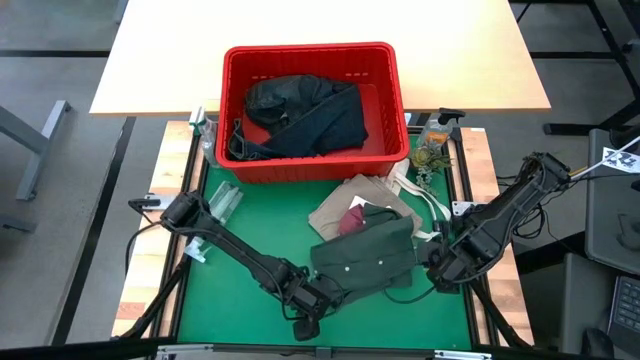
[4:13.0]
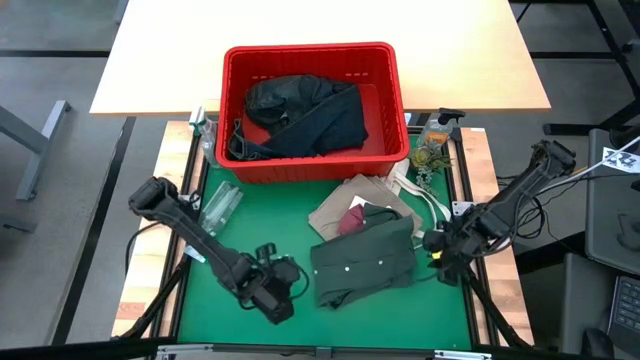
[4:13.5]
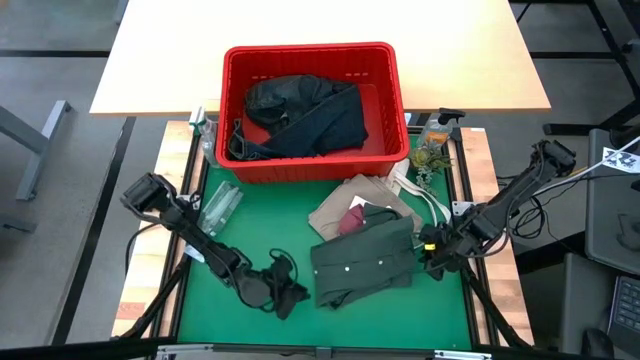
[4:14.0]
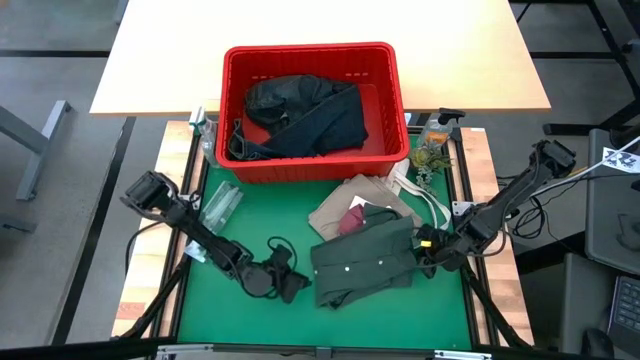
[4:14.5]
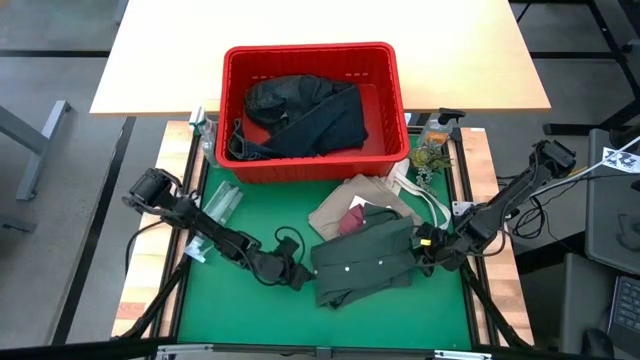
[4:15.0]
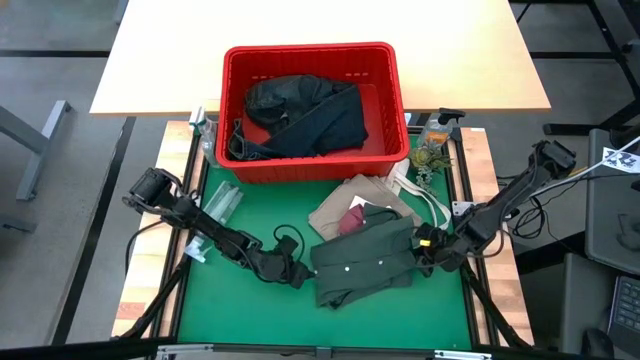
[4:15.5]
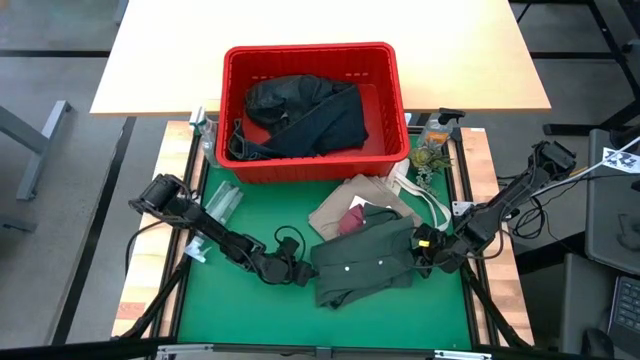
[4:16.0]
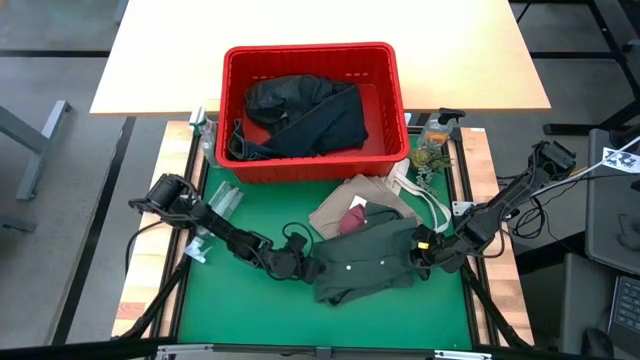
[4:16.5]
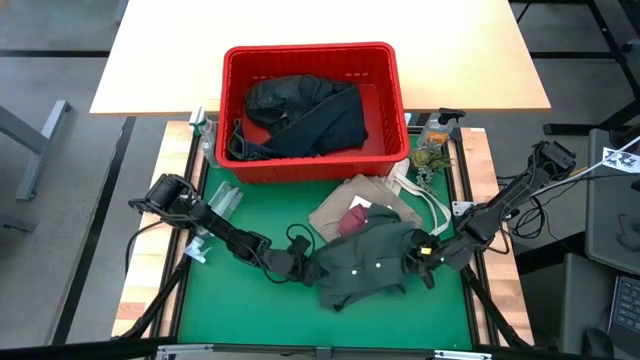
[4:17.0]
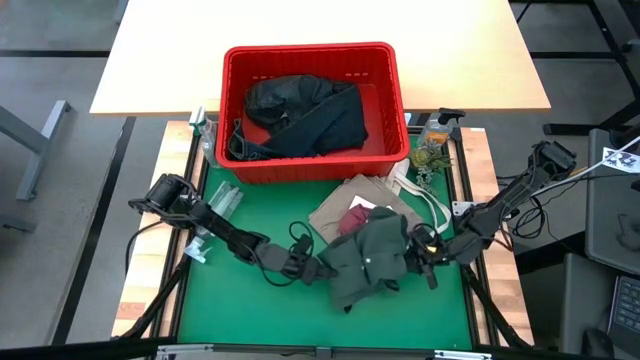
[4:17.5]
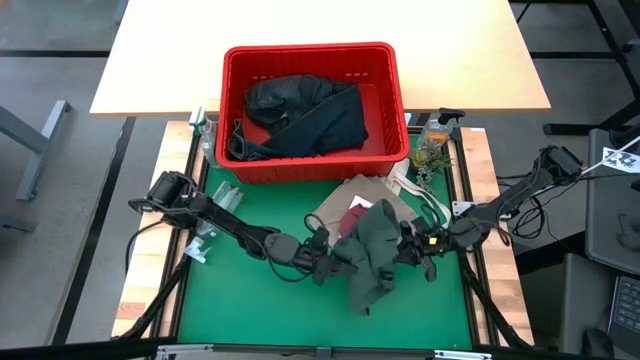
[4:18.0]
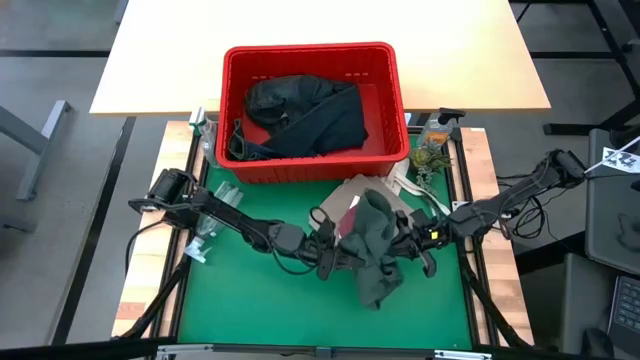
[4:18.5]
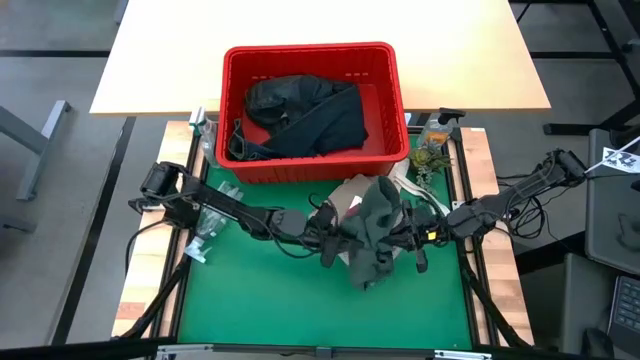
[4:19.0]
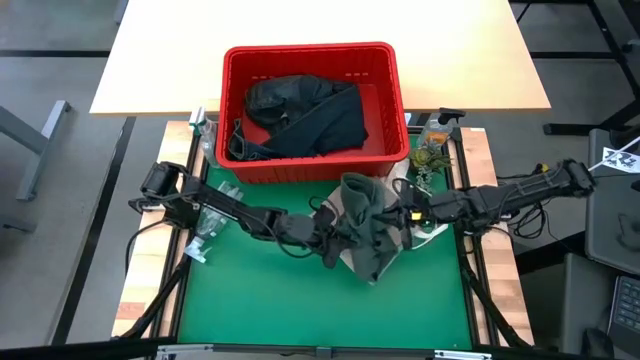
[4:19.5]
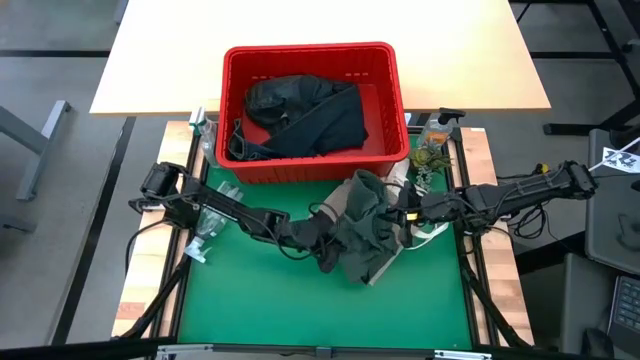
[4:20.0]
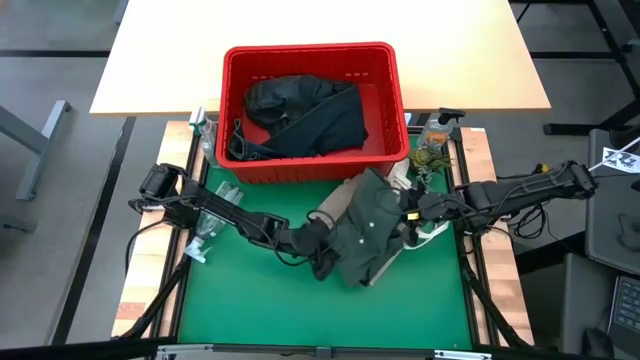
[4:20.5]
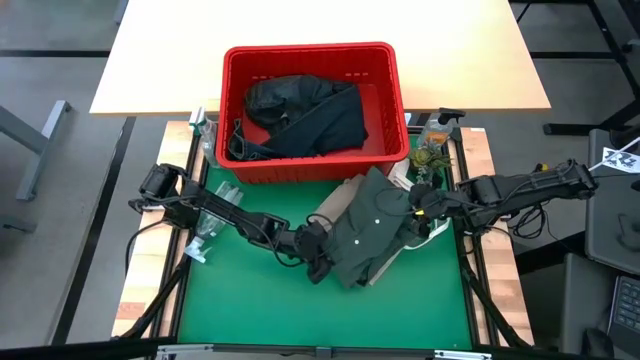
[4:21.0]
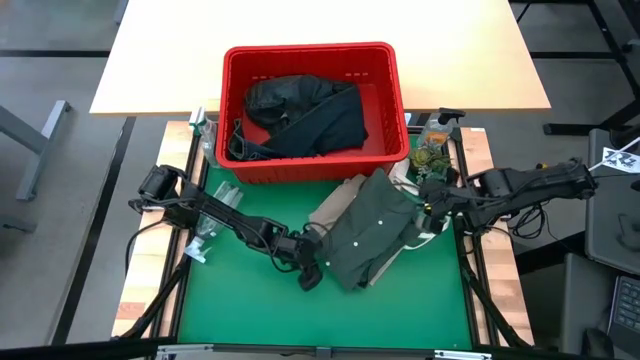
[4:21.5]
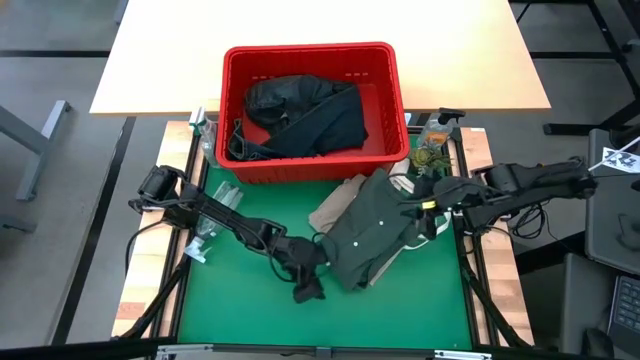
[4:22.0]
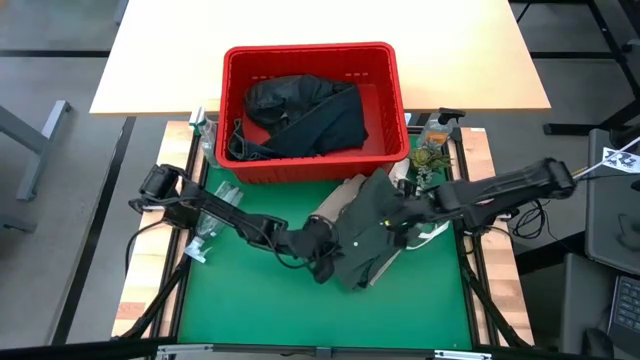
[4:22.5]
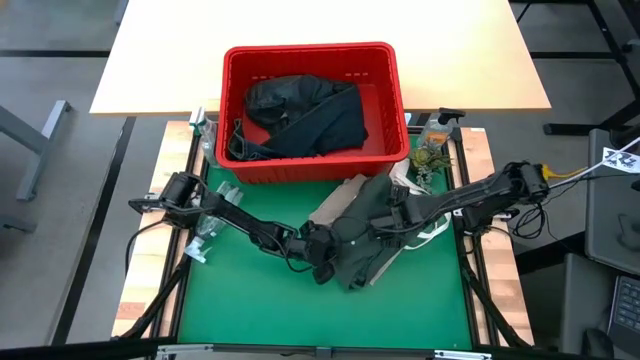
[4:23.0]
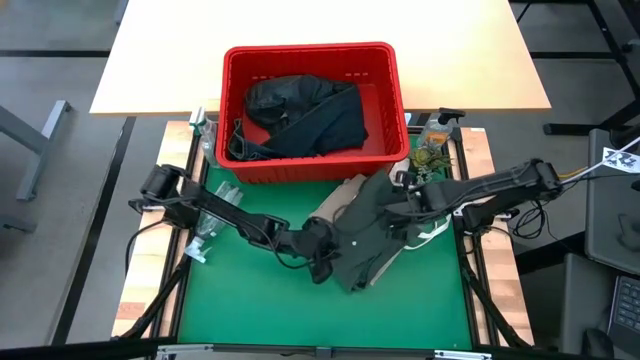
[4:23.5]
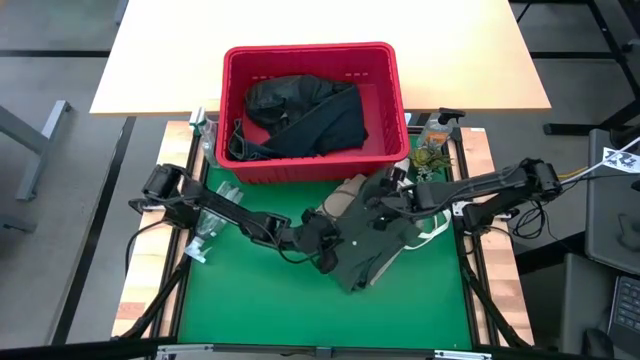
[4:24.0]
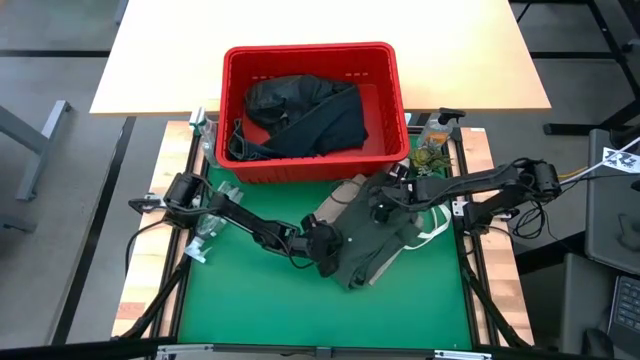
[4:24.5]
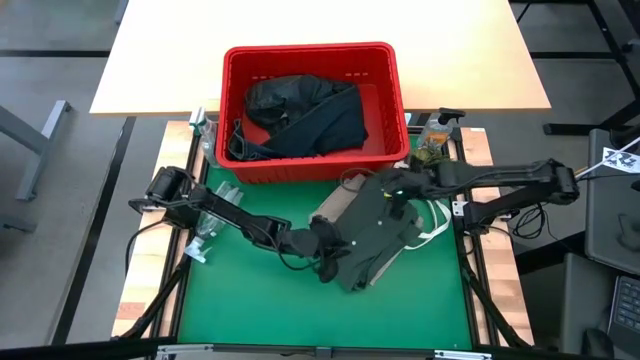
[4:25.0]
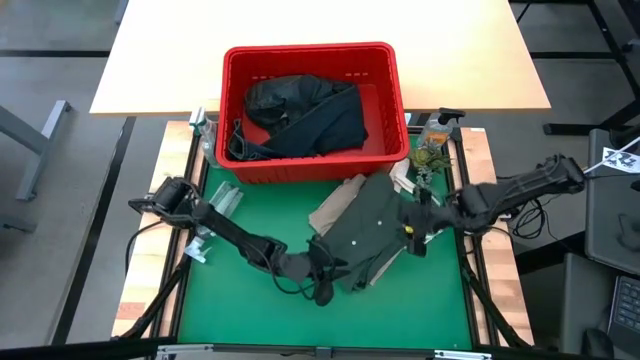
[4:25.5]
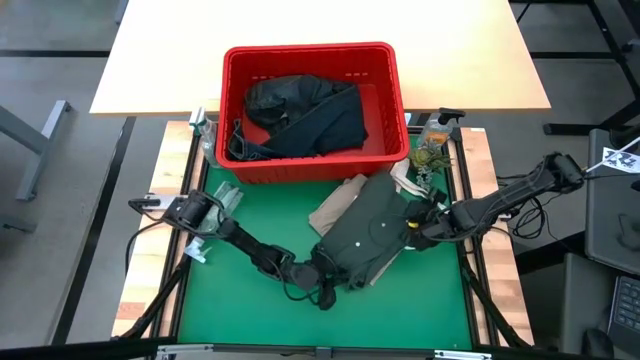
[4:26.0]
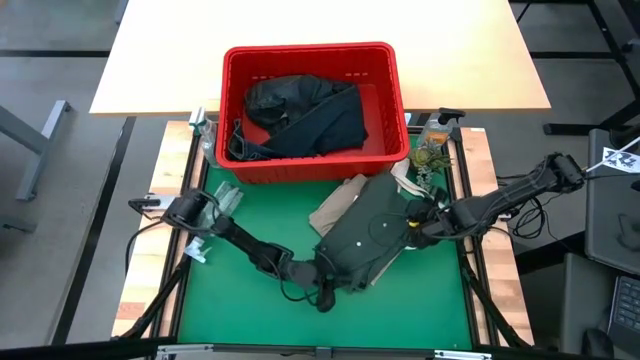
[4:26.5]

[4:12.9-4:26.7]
Task: Fold laundry
Stack the folded green polo shirt on top of the folded pink underwear

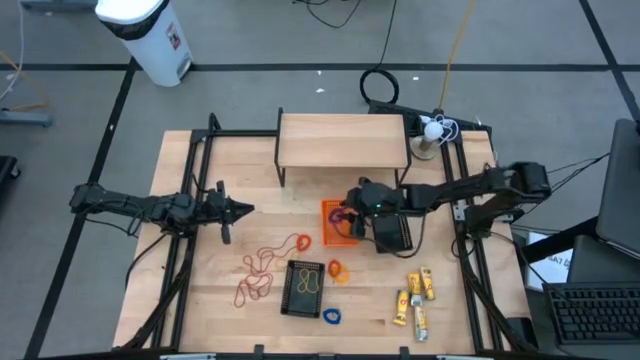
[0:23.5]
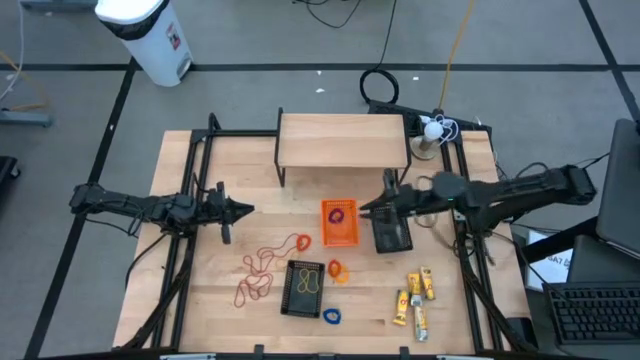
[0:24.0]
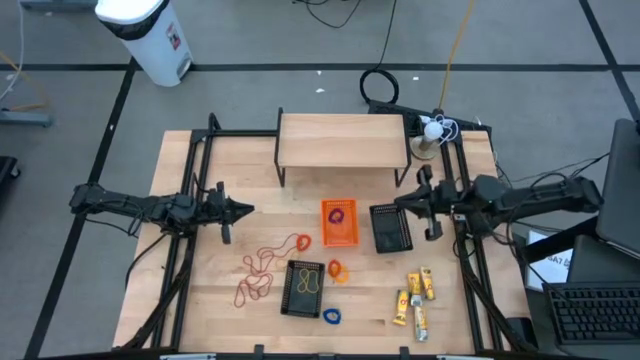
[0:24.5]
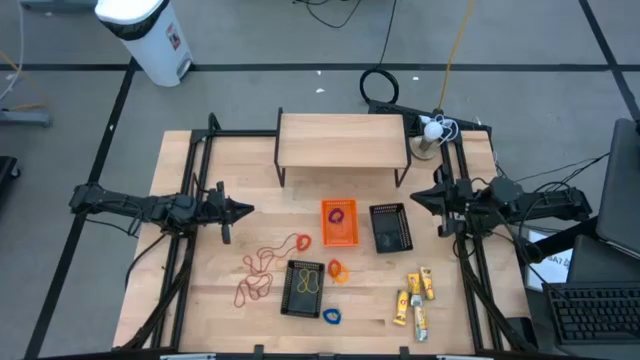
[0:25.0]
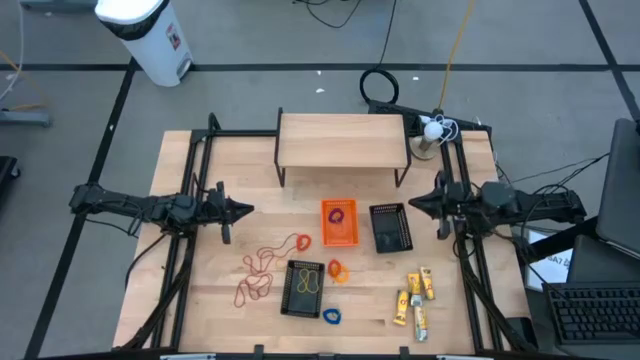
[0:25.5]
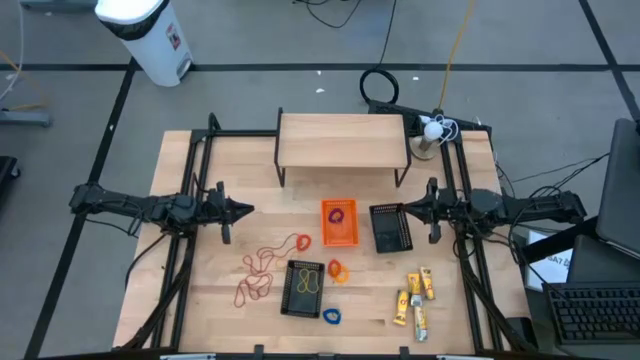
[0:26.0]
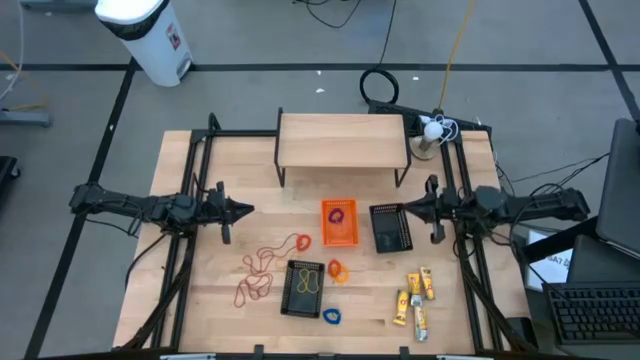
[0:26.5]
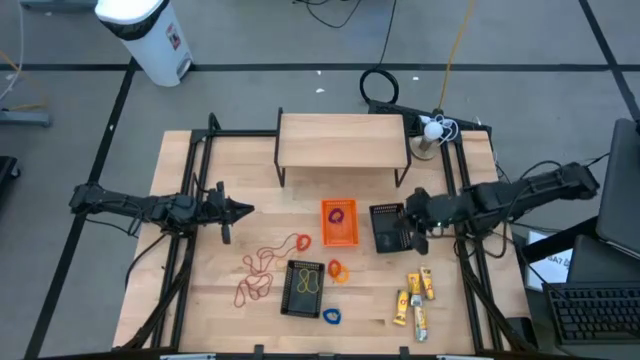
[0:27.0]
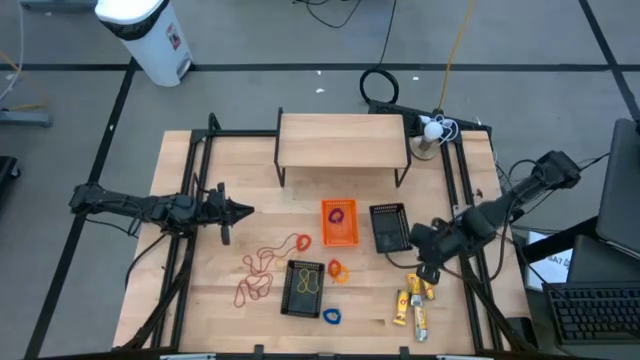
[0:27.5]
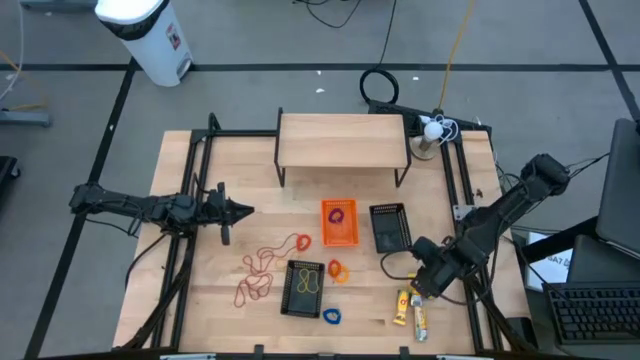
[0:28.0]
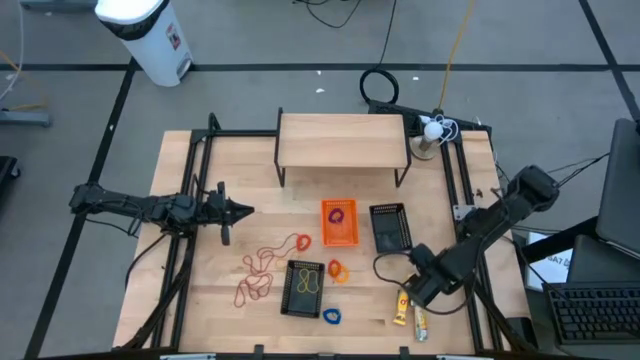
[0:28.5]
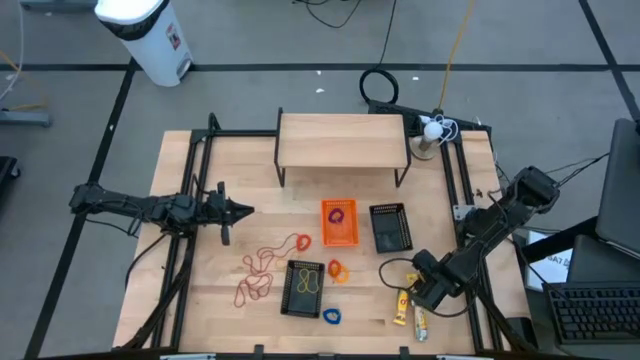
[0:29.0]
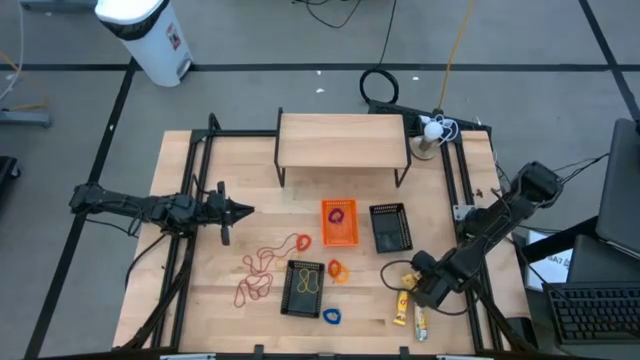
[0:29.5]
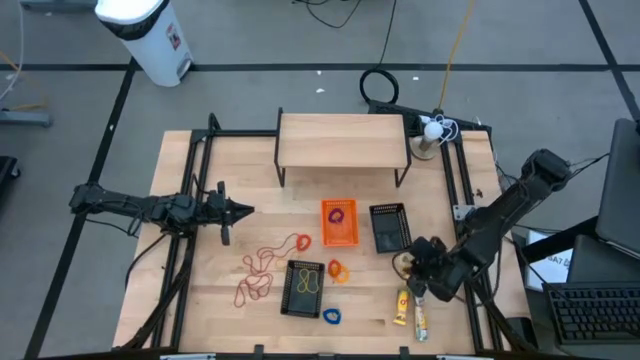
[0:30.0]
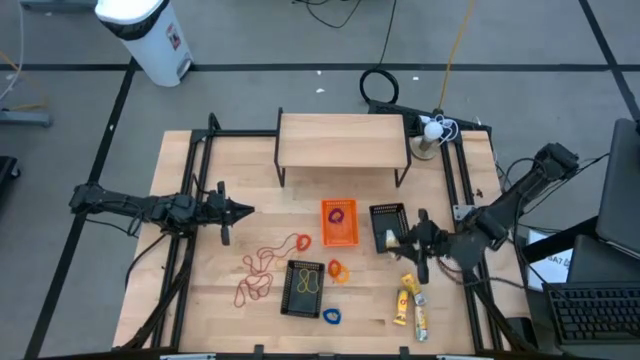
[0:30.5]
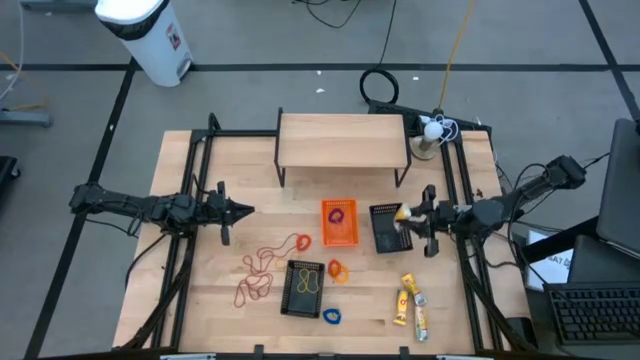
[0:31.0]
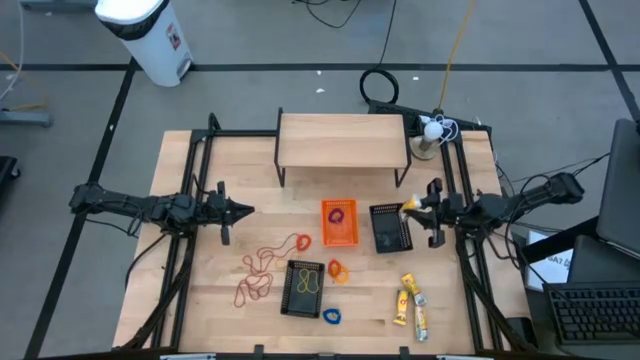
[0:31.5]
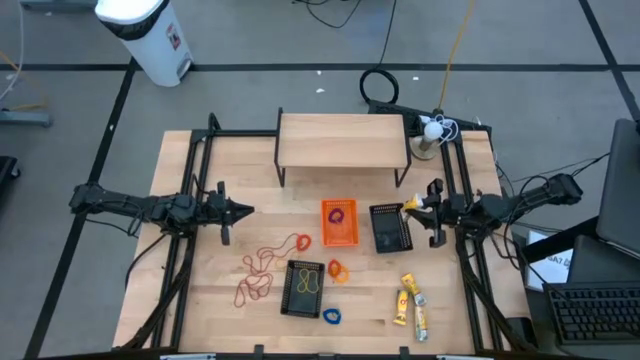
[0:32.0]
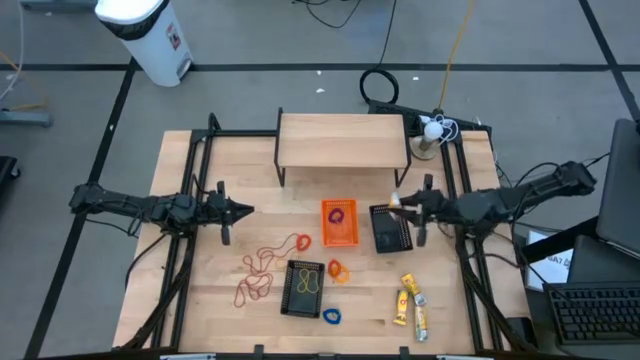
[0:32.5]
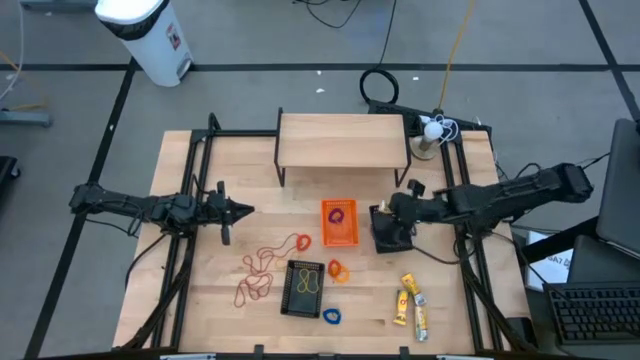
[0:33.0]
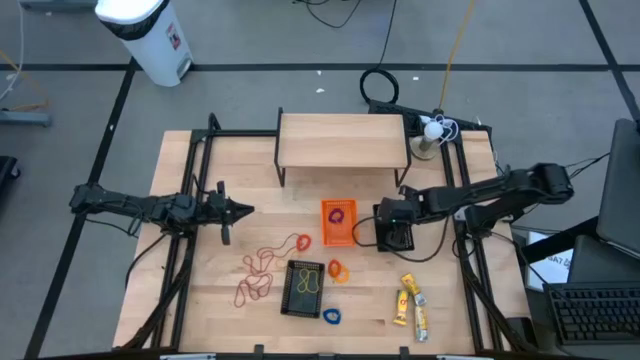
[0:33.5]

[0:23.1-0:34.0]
Task: Pick & Place Office Desk Supplies
Put the yellow crayon box into the top black bin
